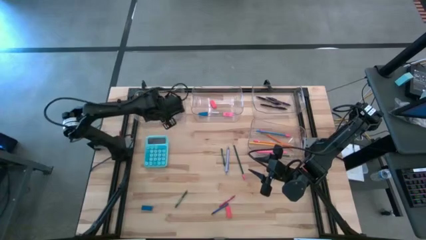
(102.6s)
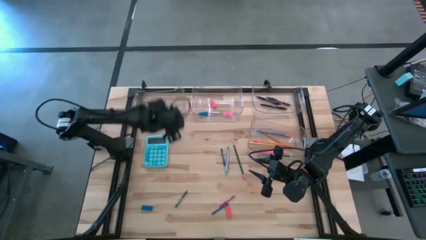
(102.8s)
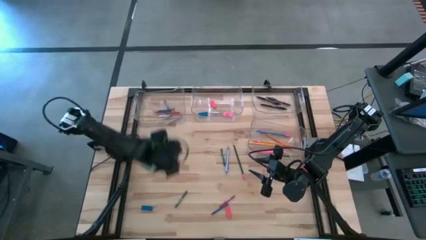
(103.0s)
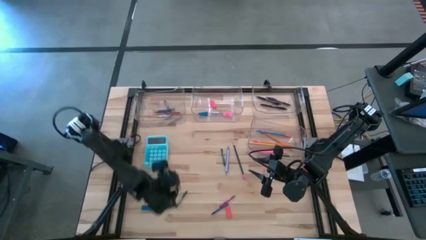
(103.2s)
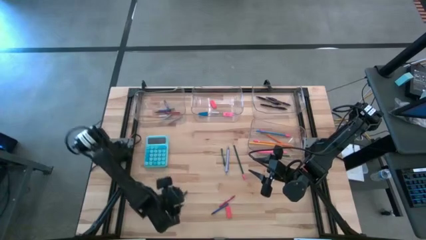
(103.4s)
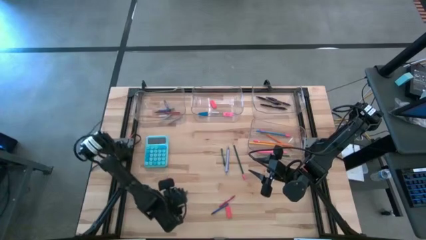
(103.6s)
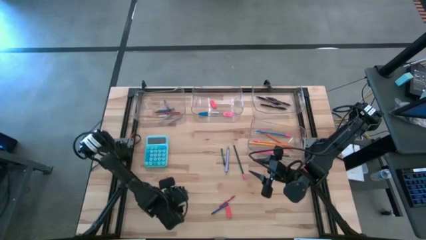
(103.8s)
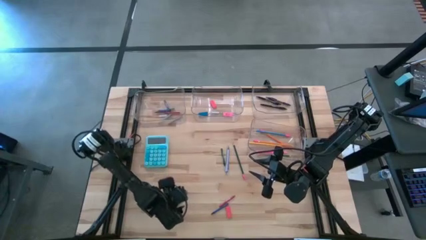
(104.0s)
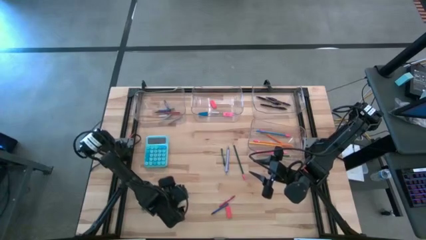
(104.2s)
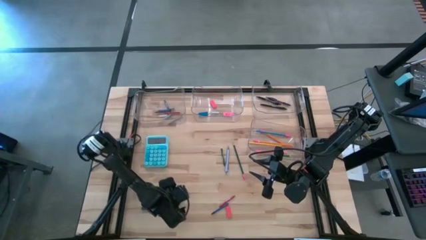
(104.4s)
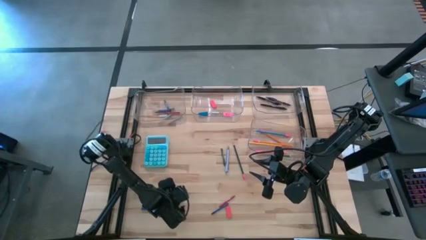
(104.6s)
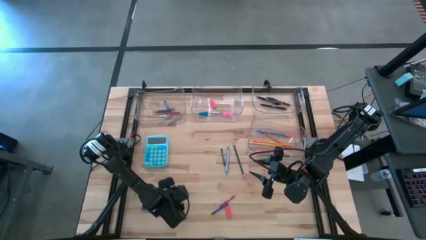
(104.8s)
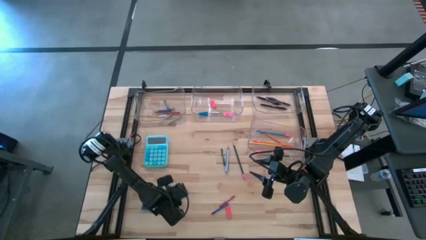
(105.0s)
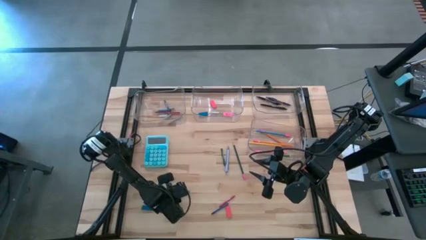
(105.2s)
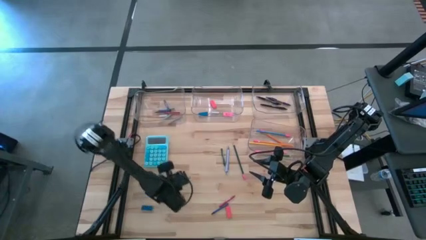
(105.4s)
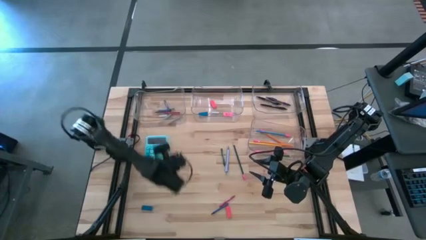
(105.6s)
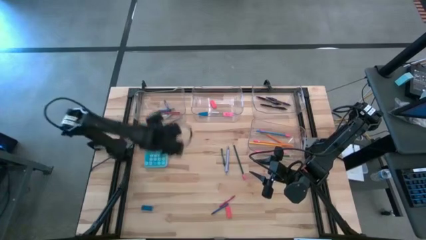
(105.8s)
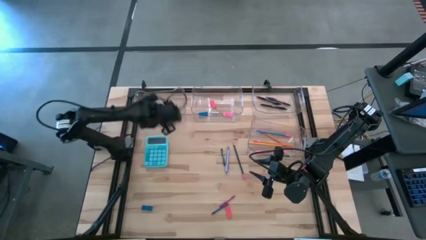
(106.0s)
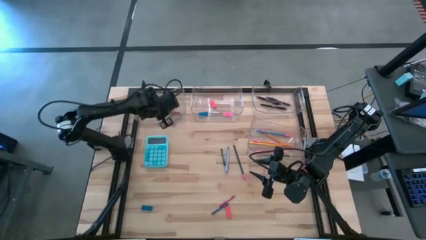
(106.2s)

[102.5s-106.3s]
Task: Sort crayons/erasers/pens/pencils in bins
Put the bottom green crayon into the top left transparent bin

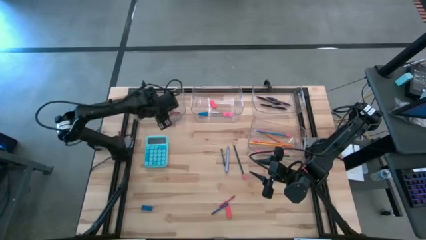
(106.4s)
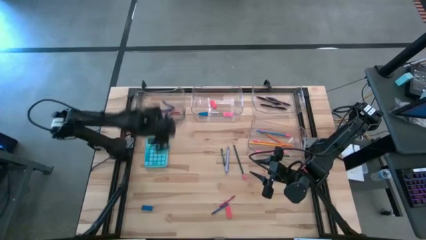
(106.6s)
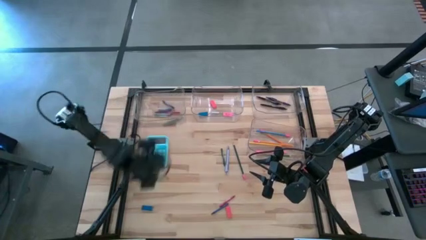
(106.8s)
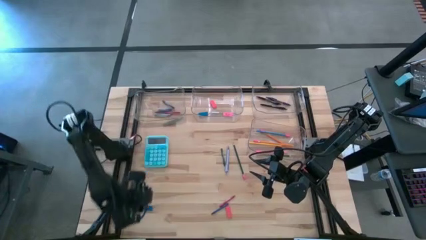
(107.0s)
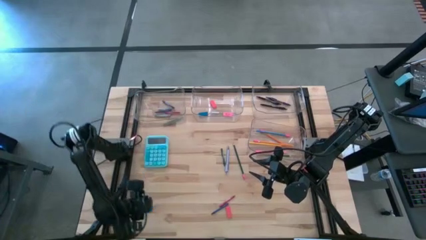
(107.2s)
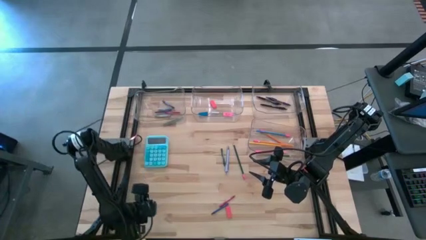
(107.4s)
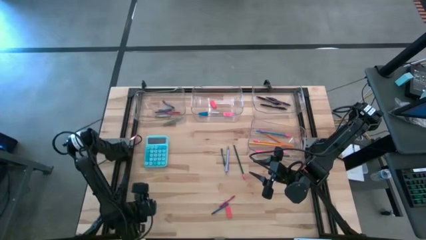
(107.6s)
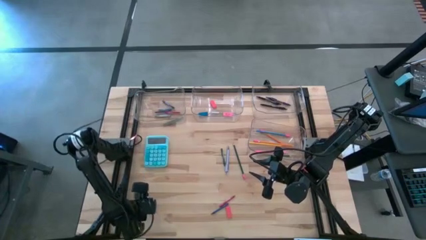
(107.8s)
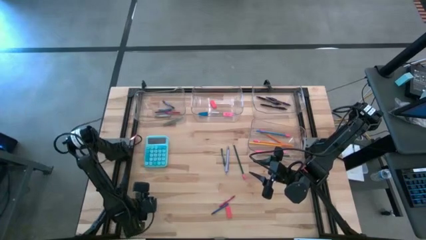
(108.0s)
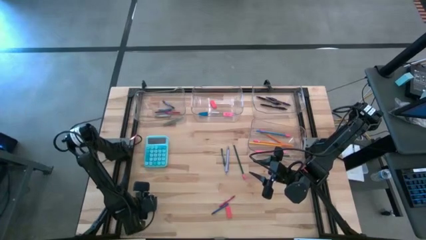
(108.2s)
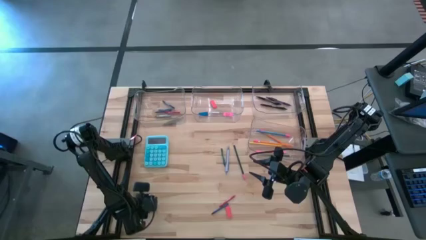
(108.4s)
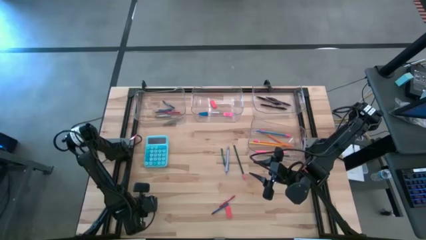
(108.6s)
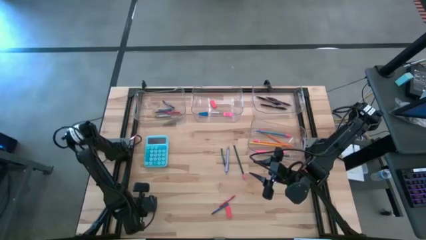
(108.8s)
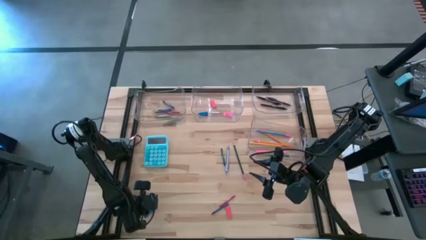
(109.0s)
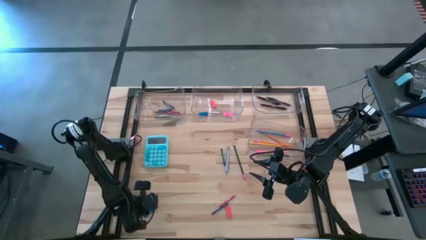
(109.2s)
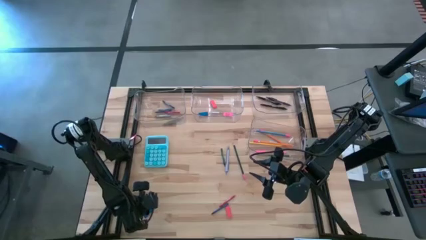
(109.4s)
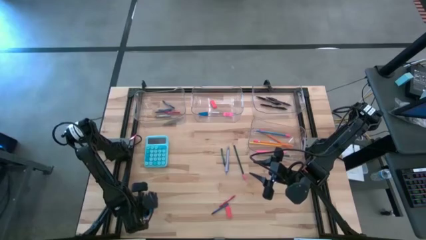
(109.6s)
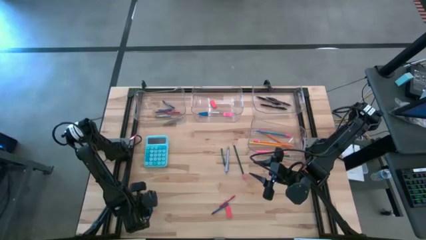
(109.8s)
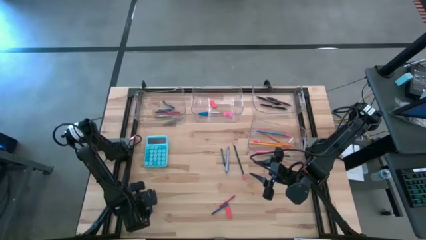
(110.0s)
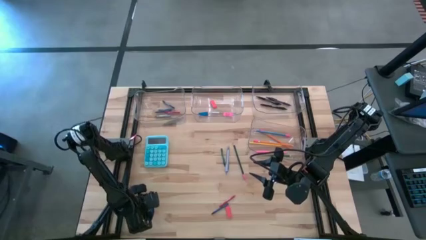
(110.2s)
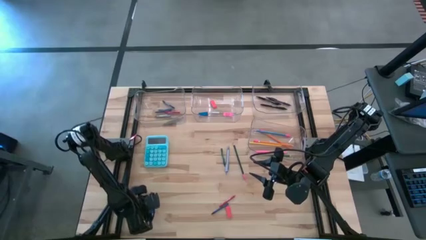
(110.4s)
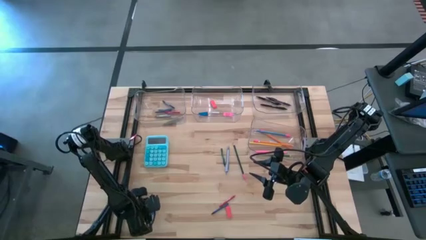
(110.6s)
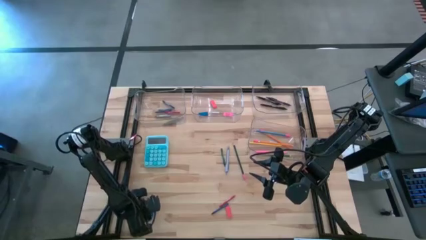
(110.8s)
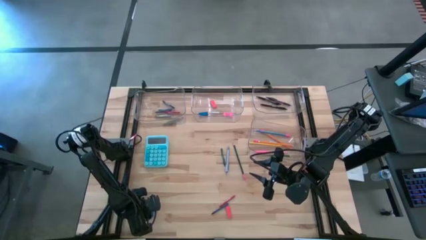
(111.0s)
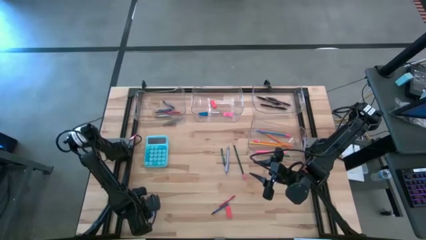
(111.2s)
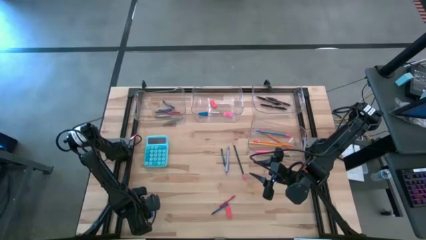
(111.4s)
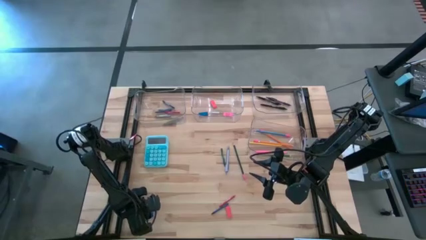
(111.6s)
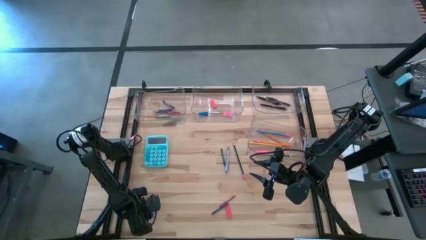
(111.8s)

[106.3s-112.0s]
Put the blue eraser into the top center transparent bin

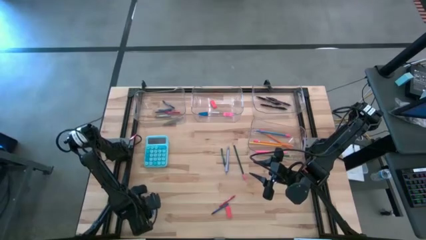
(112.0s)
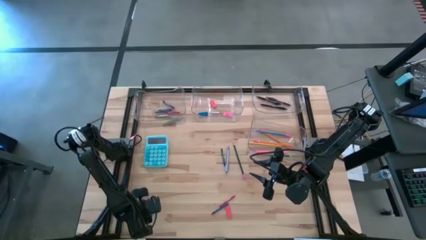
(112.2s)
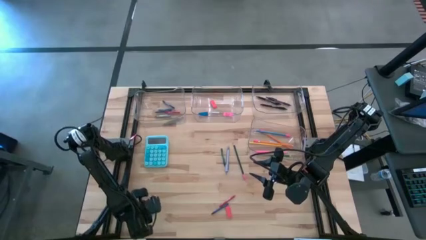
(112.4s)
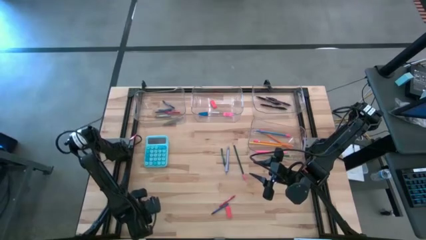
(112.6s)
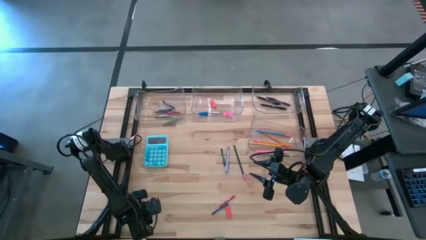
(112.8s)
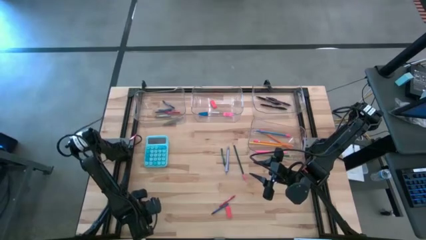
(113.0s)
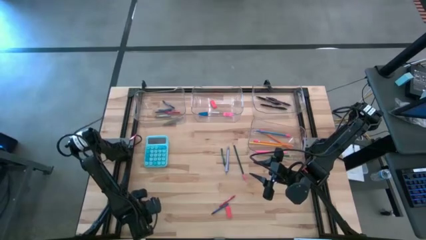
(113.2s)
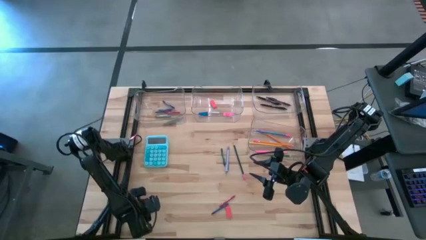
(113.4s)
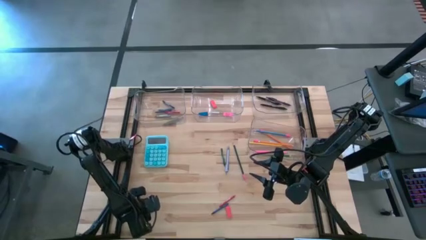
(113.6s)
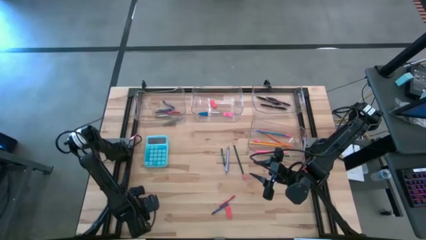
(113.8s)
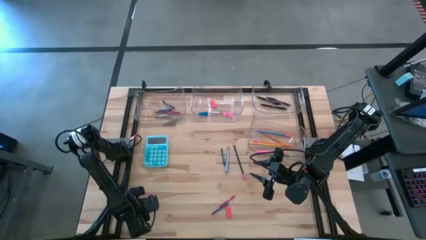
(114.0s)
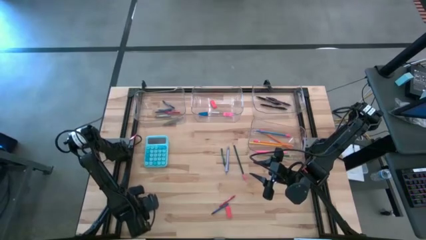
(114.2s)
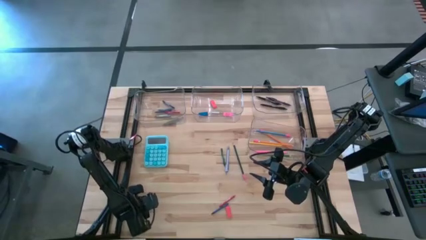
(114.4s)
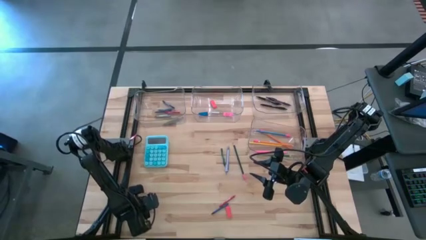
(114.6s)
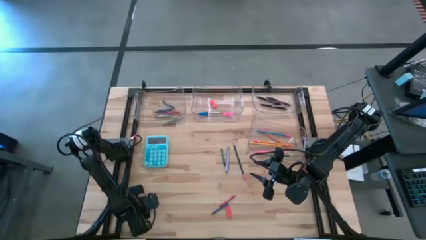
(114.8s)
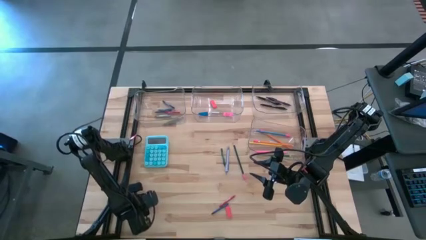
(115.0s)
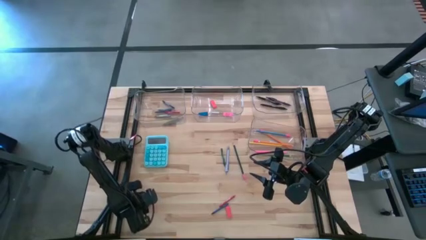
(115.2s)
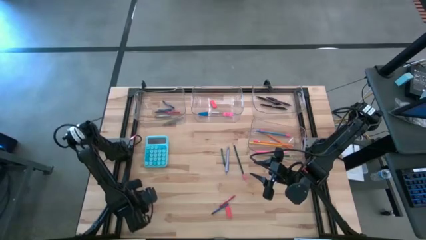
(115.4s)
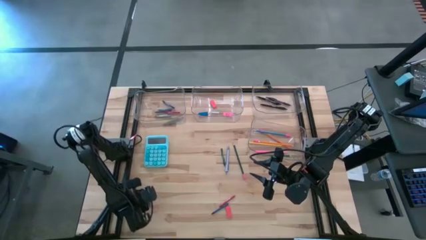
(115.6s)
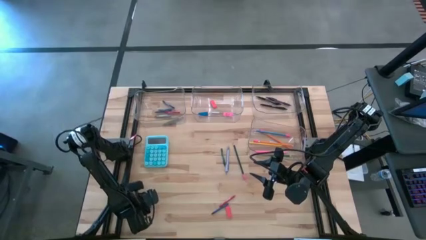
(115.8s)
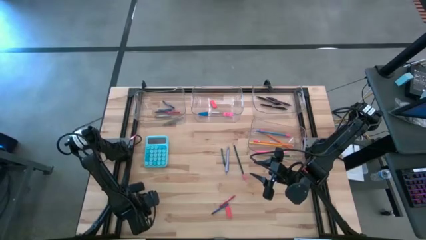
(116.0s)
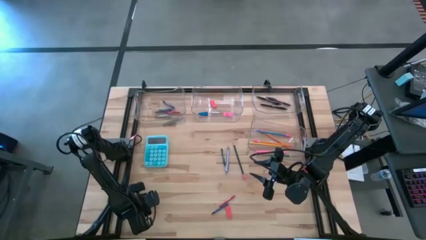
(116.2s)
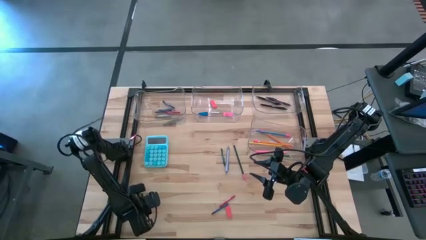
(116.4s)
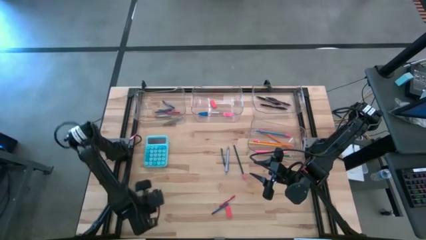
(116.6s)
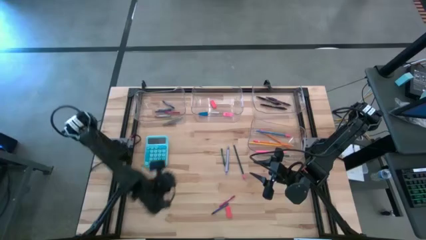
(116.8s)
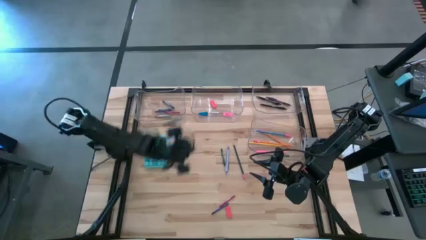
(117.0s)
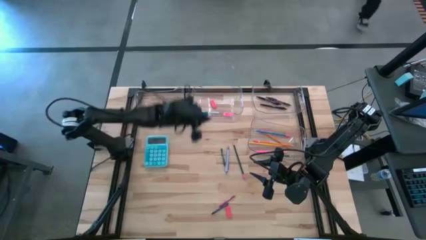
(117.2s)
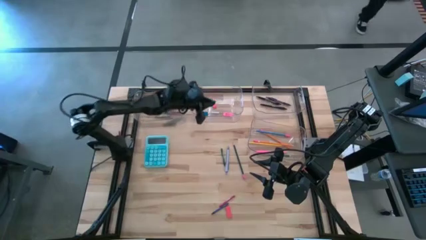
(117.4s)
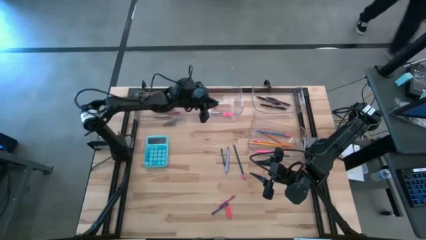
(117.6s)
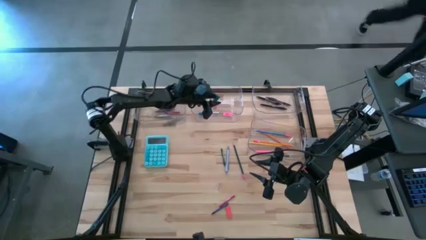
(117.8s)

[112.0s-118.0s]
Put the blue eraser into the top center transparent bin

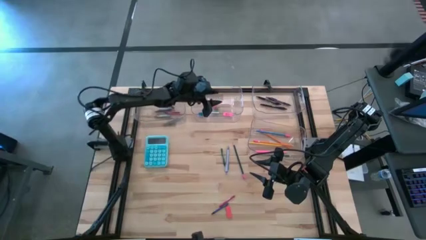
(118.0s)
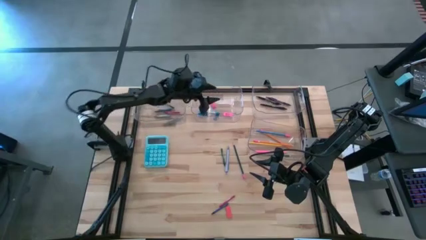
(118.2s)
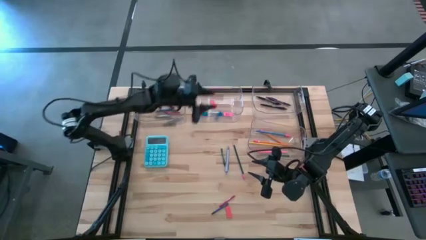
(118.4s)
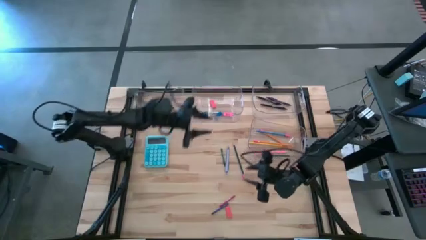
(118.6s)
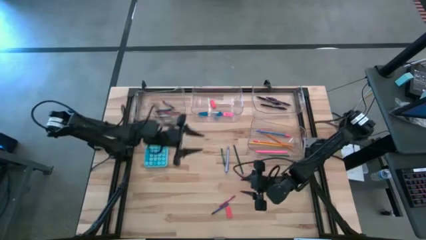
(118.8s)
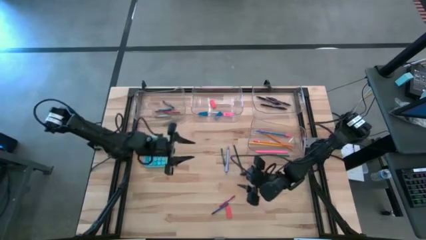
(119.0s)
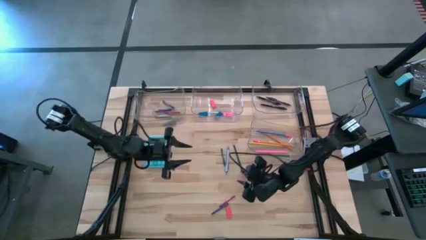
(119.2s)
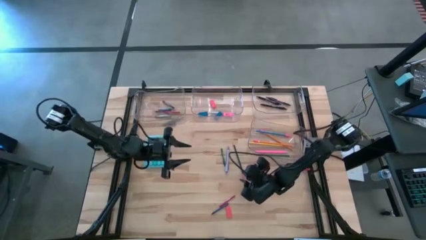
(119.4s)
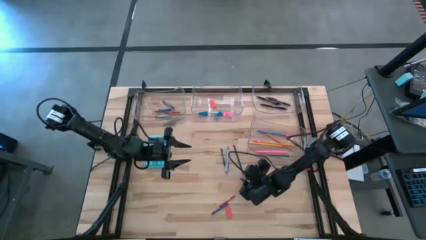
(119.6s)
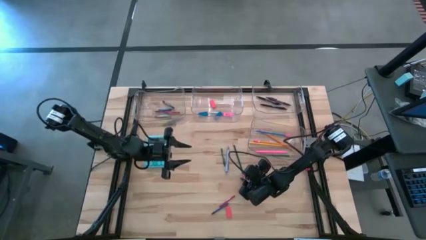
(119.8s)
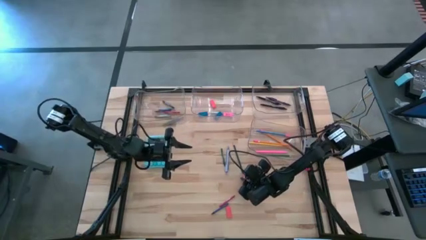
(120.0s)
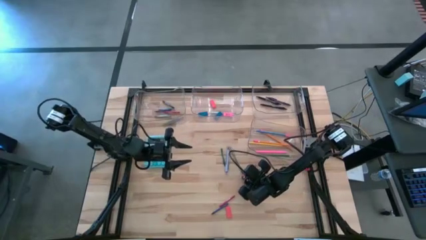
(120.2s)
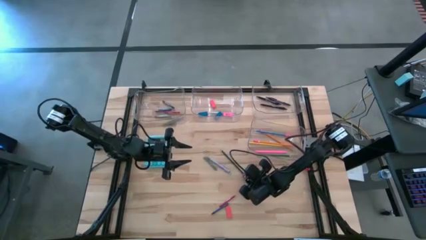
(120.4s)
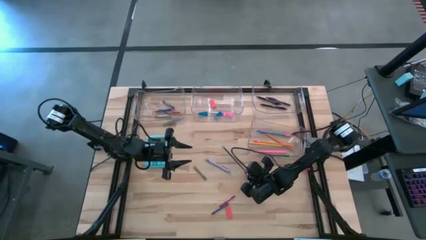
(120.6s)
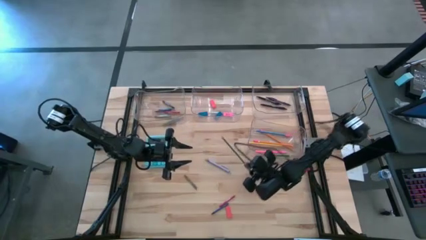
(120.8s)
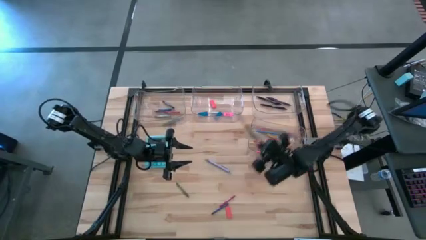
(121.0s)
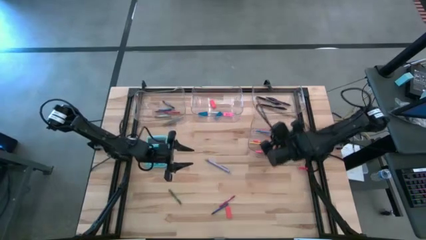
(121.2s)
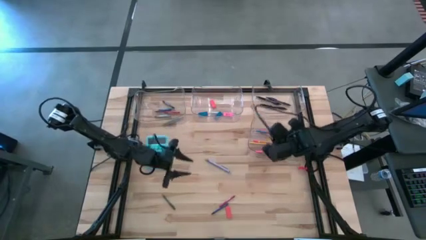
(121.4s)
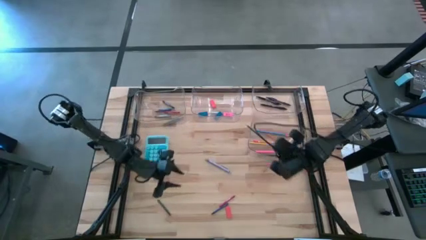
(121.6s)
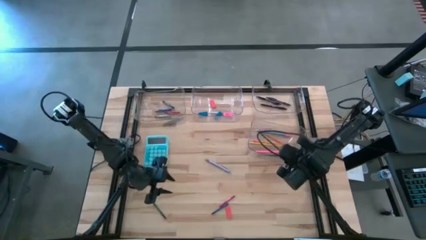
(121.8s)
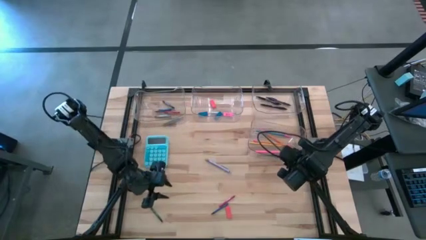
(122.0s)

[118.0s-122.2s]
Put the green colored pencil into the bottom transparent bin
